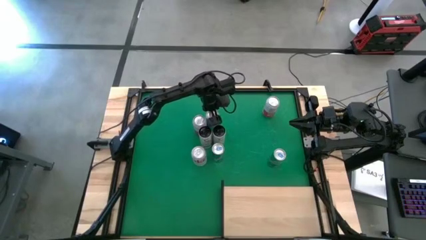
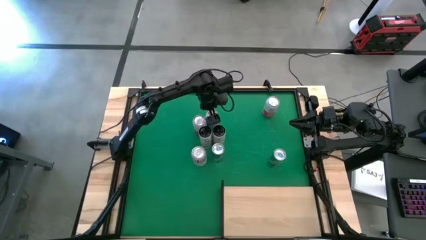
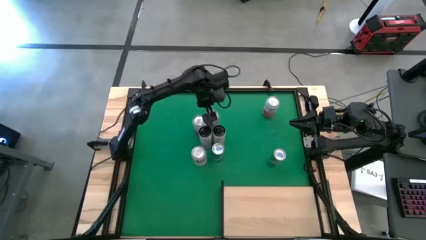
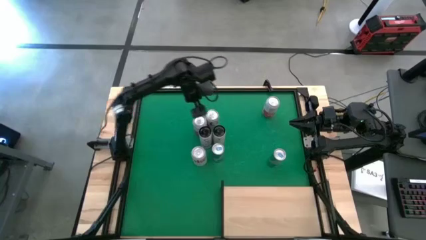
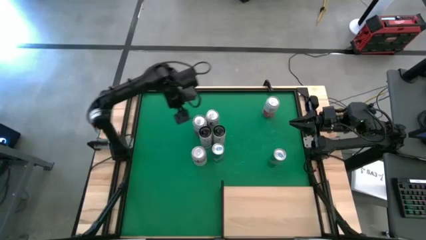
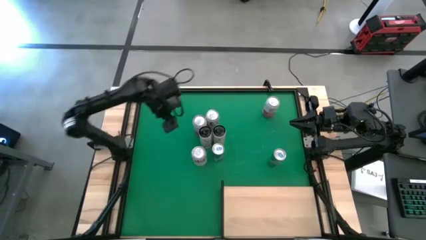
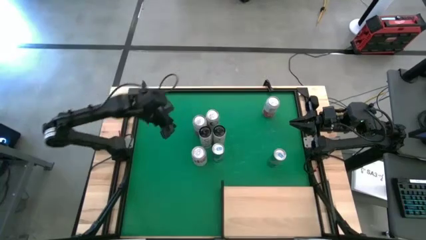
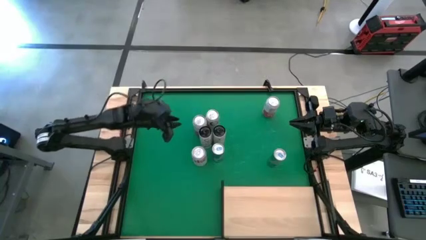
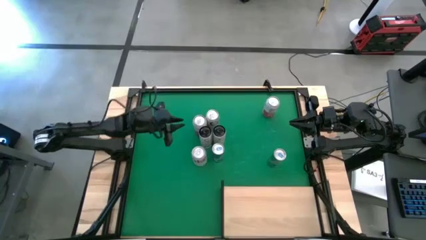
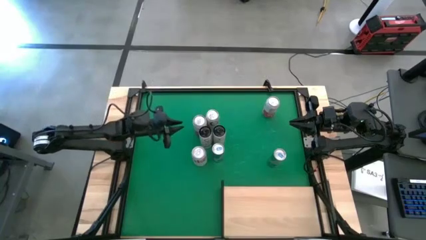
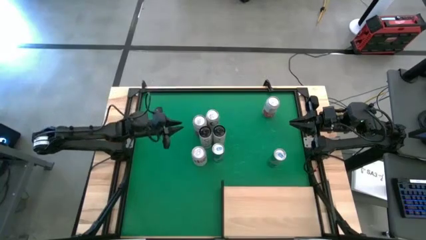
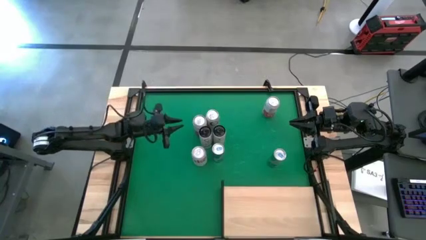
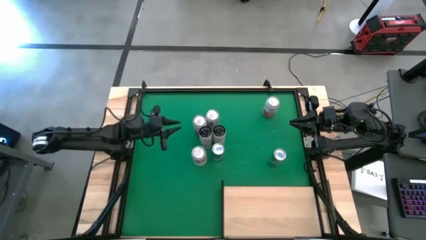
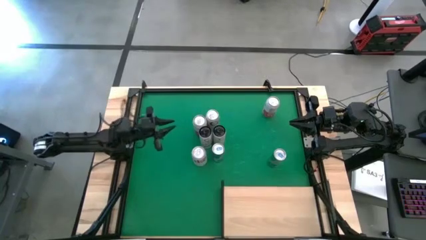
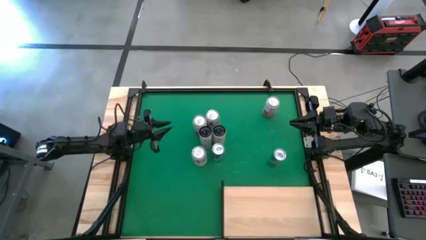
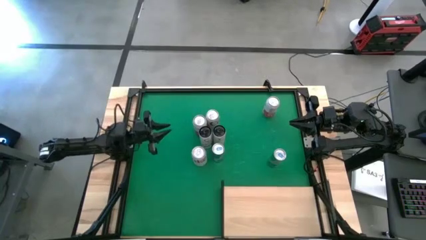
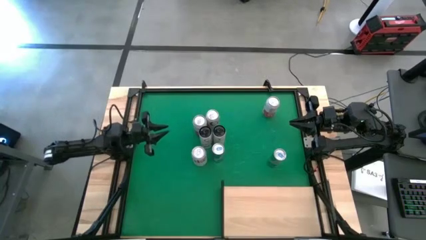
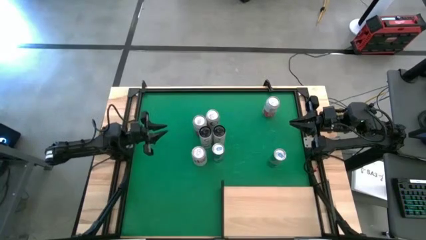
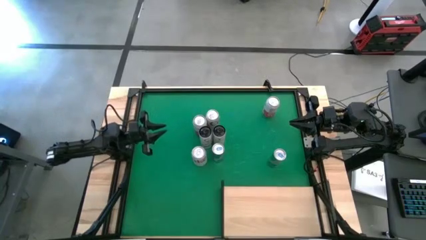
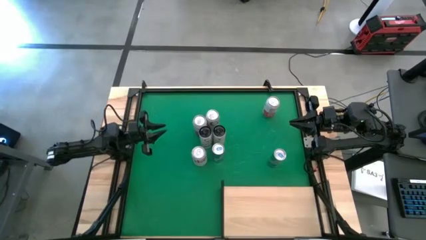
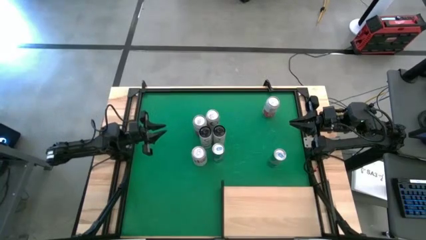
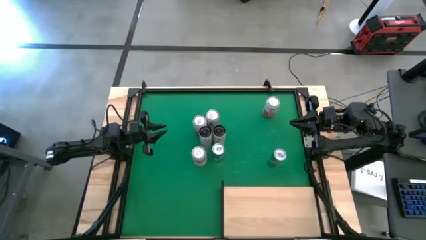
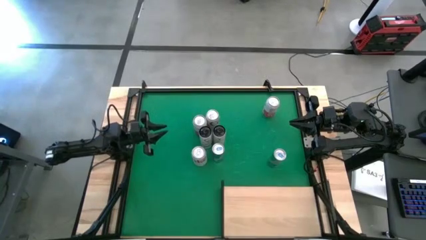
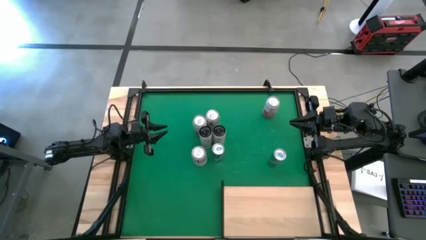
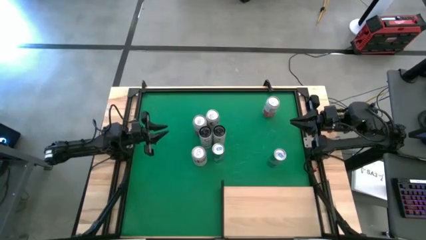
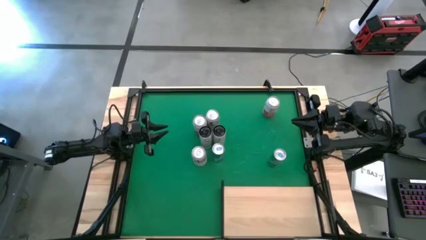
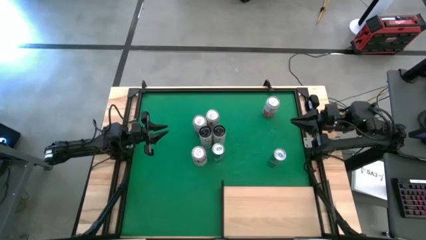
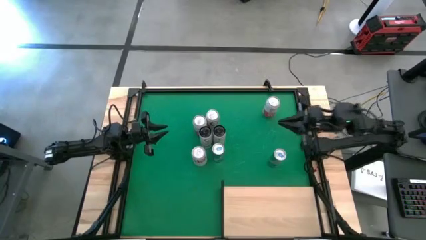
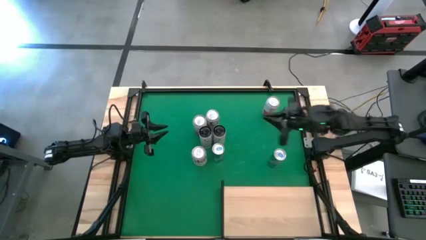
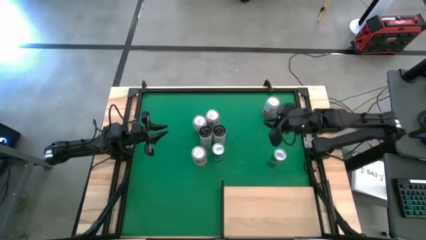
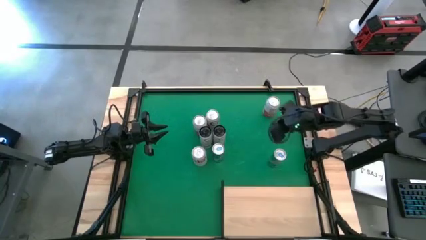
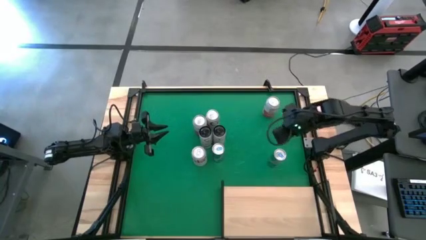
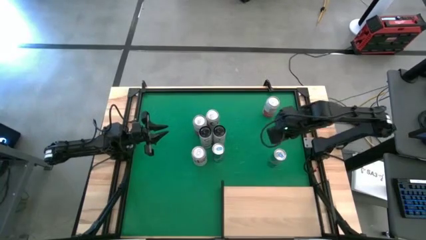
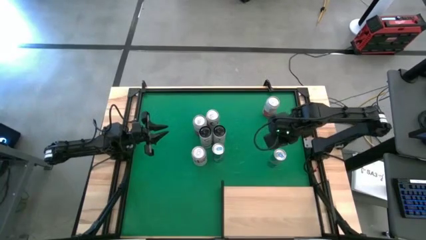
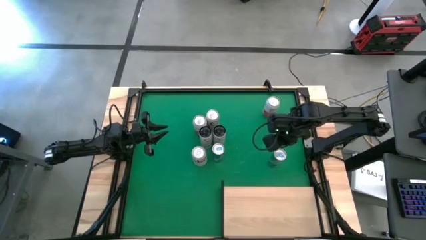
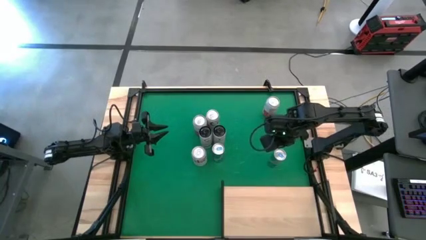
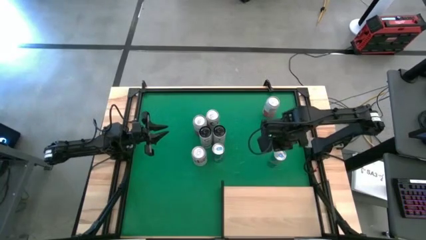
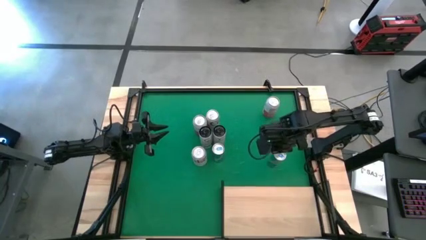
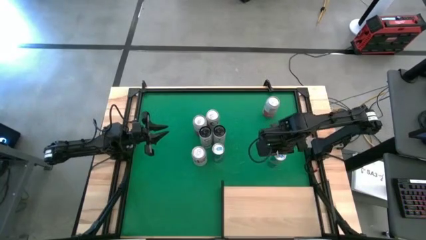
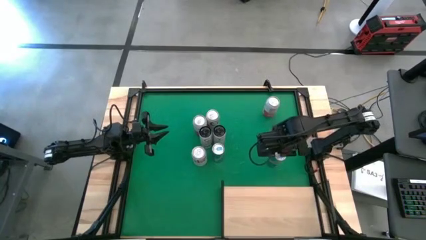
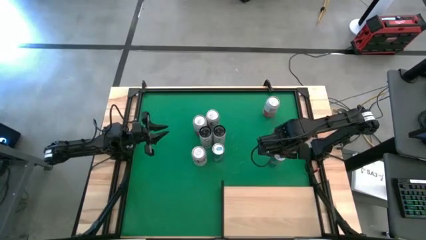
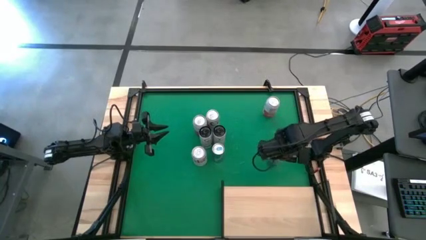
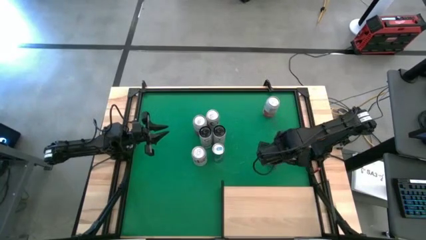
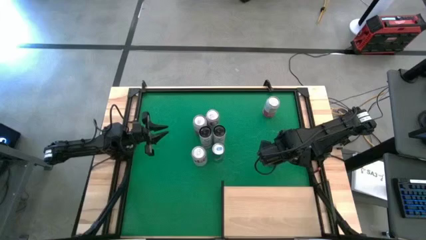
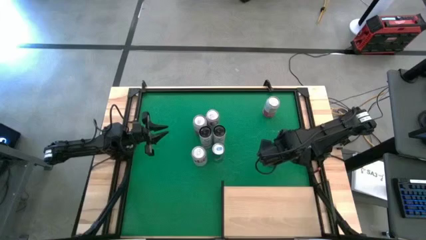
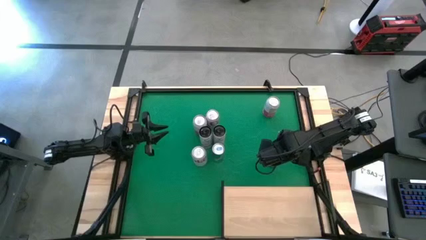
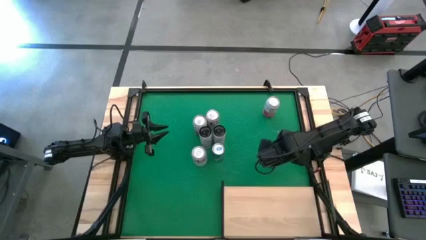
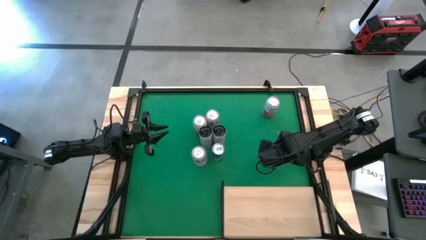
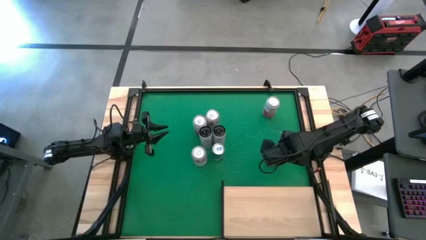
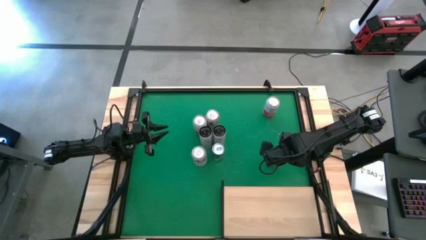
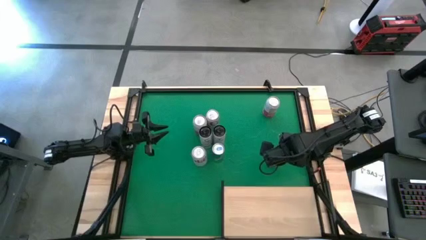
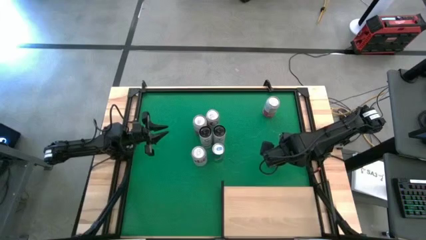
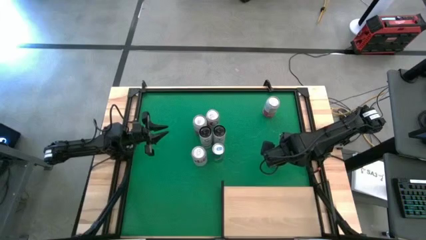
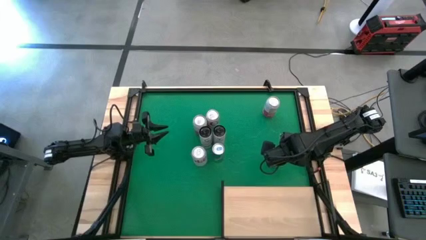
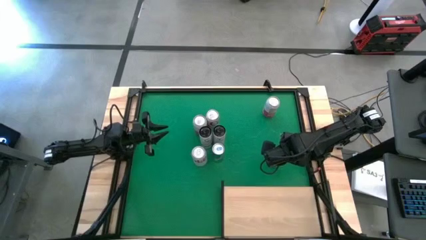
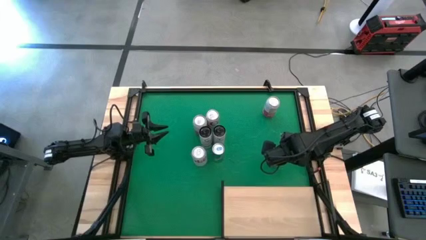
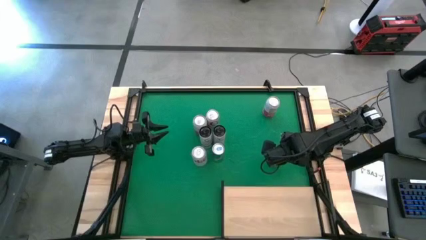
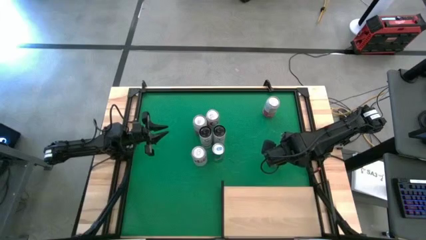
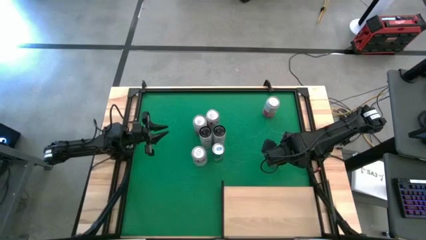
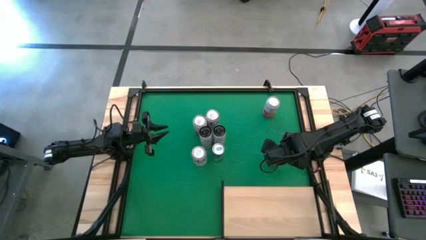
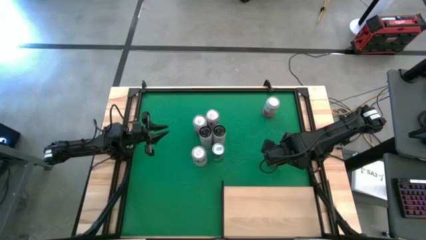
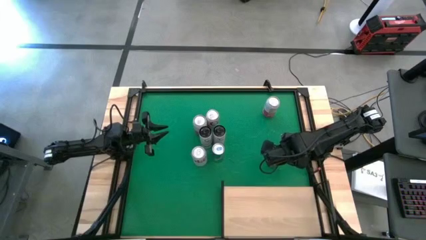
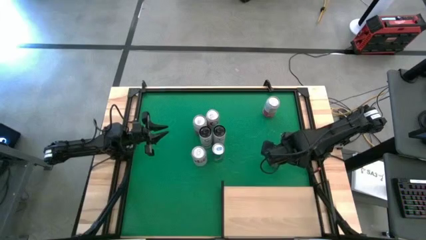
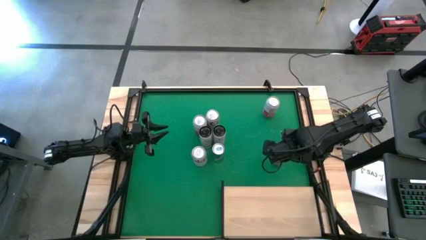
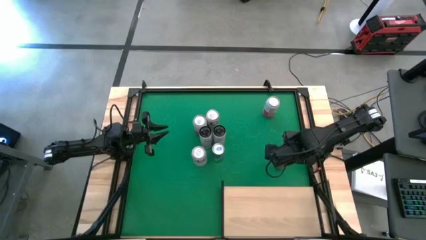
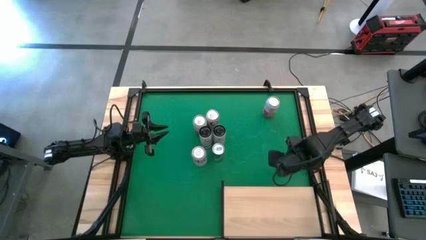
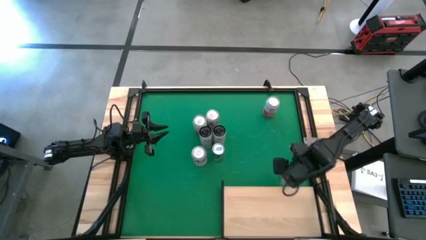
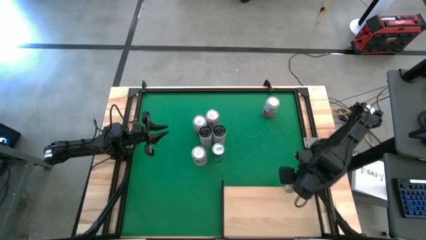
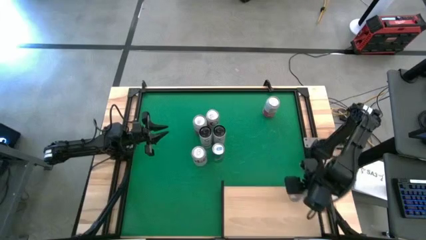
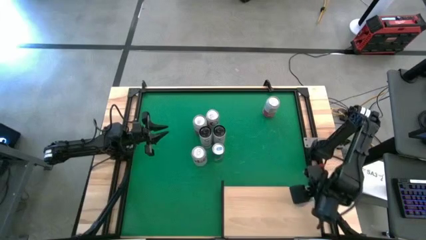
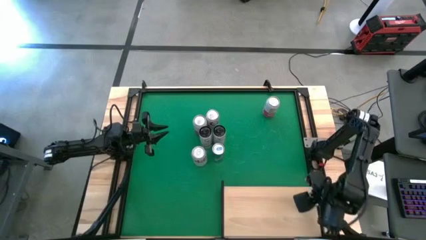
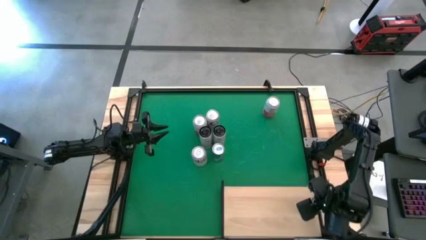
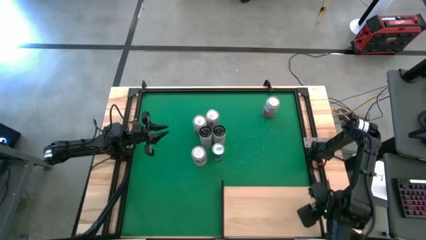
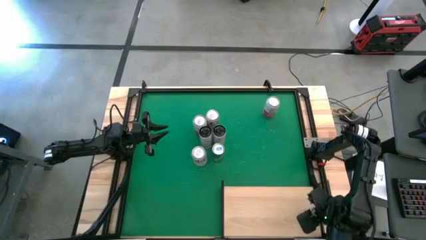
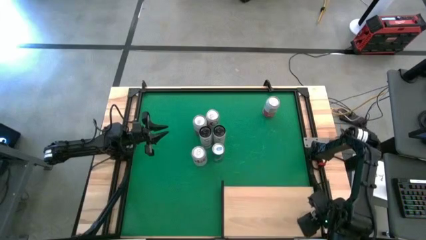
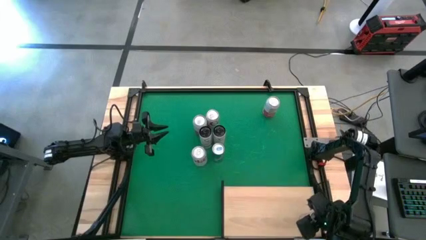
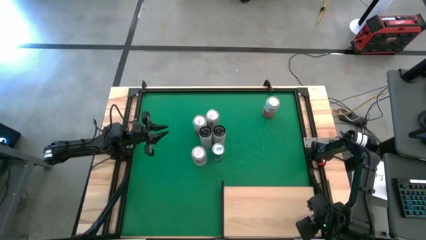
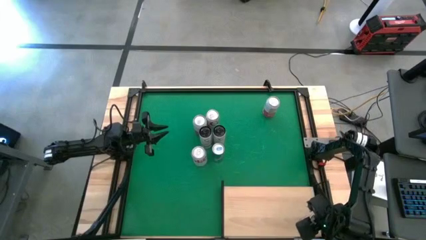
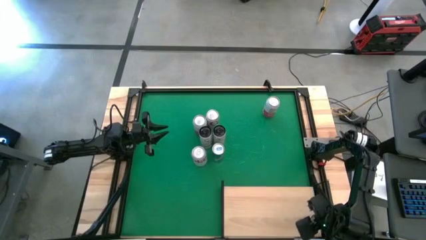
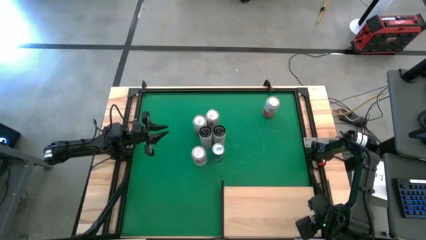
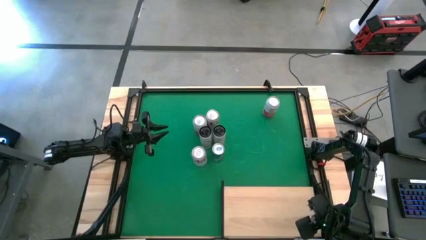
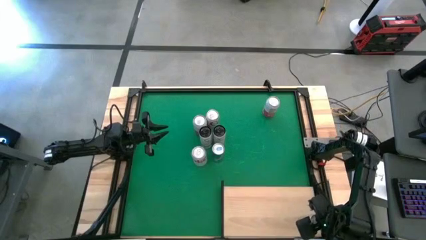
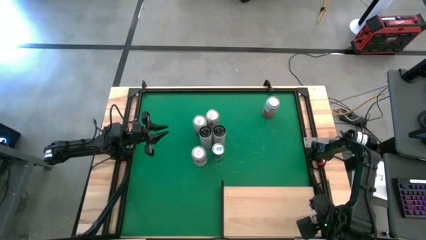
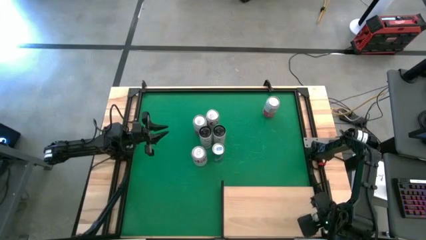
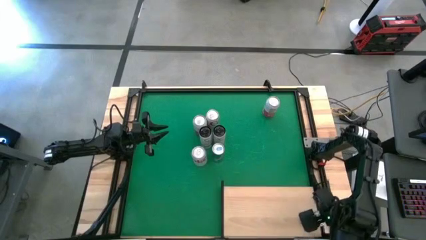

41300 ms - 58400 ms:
Task: Place canned beverage on shelf
Put the right blue soda can on the shelf
